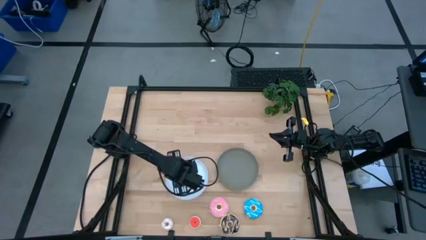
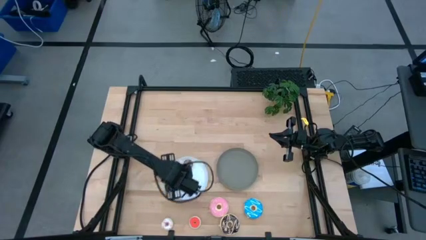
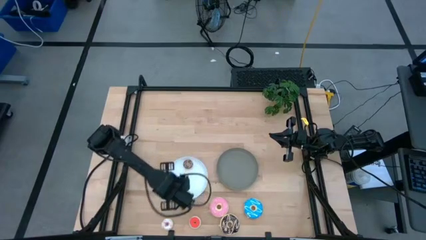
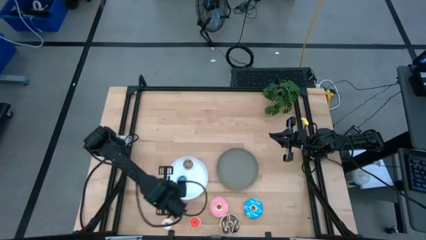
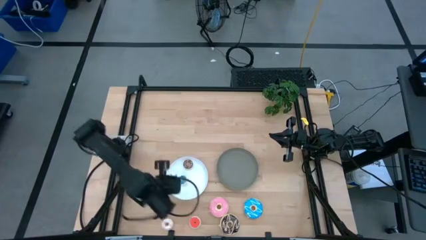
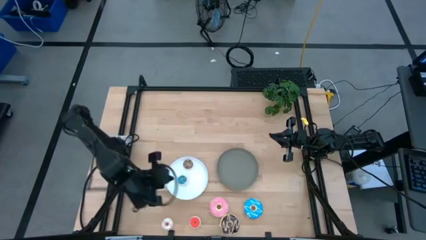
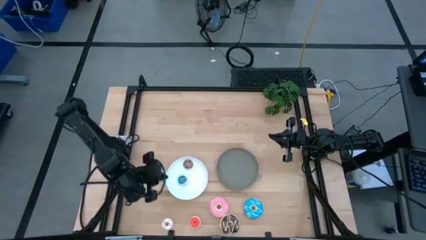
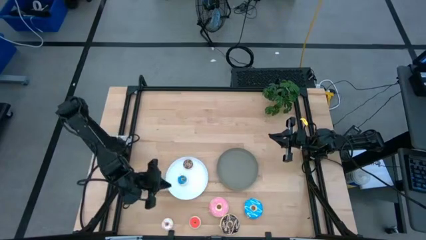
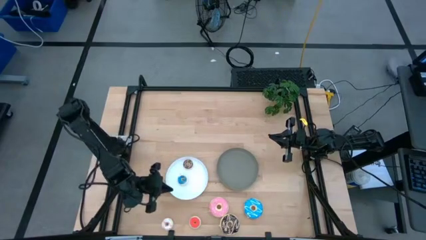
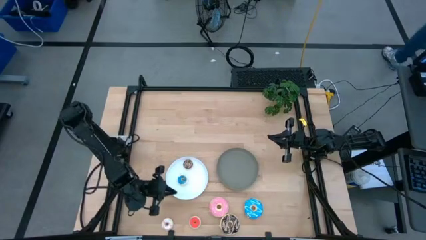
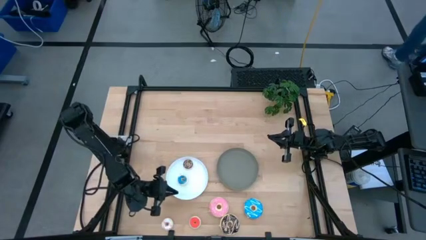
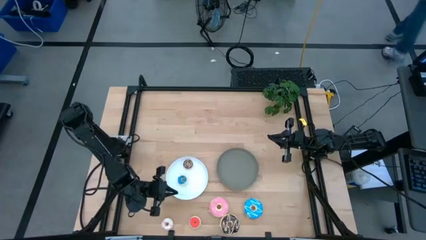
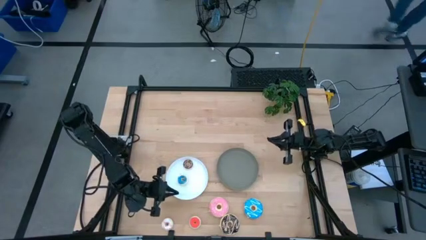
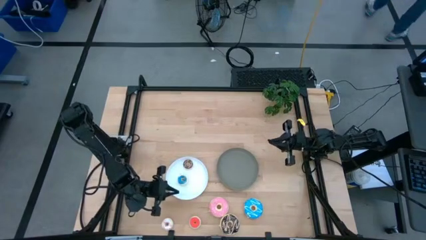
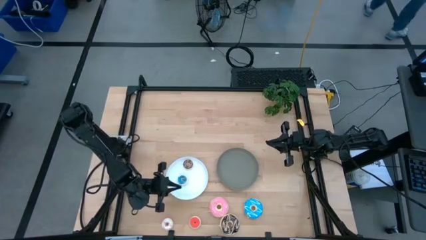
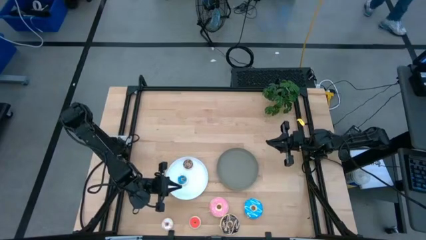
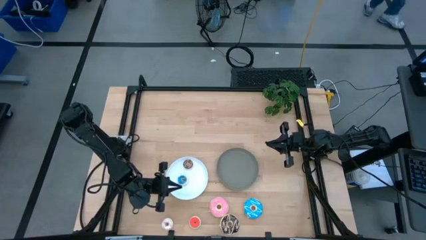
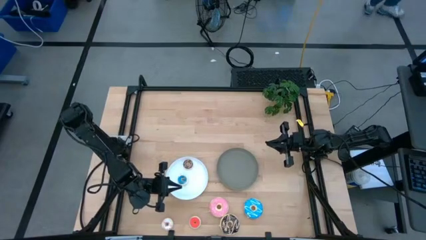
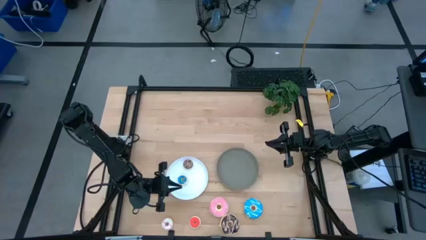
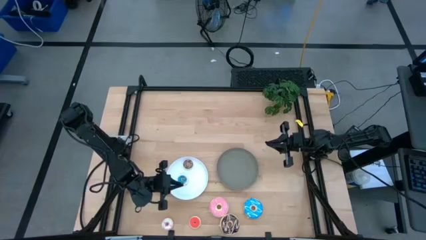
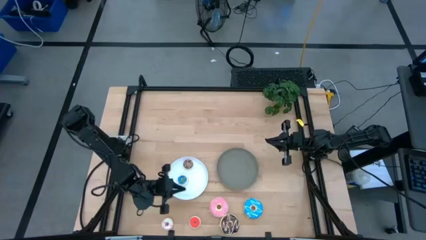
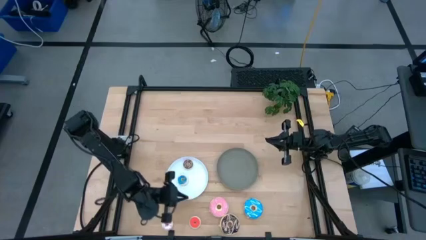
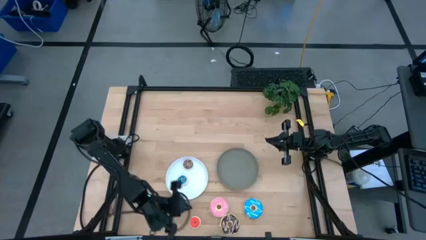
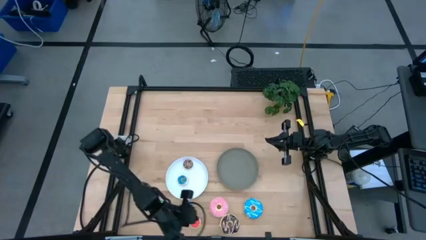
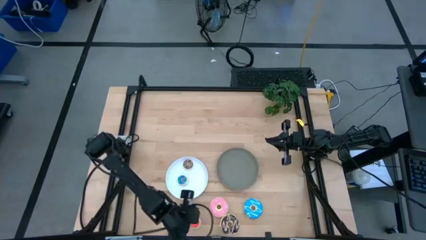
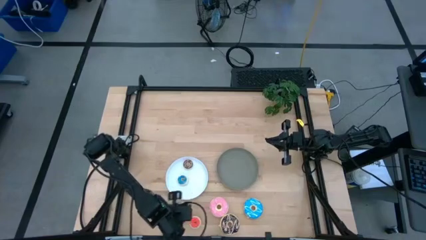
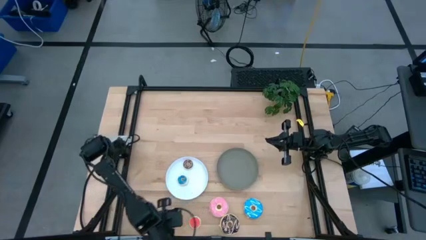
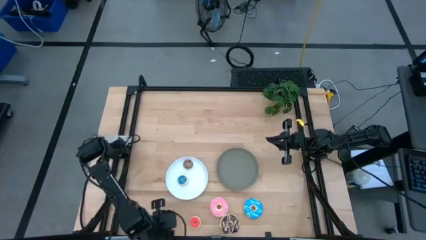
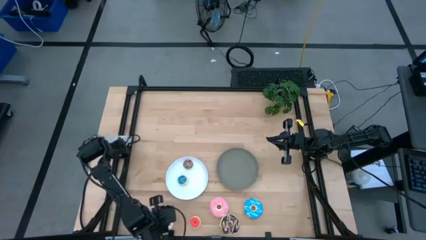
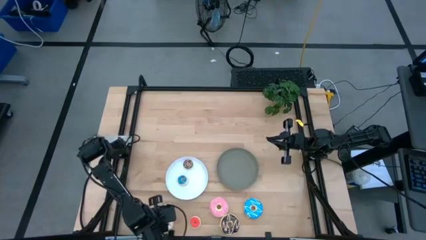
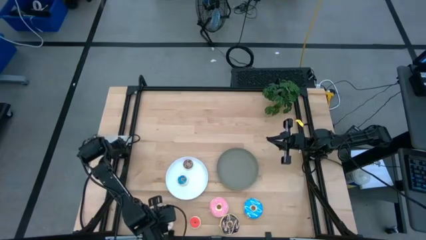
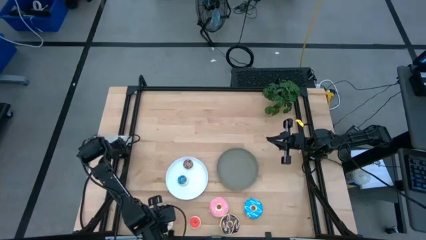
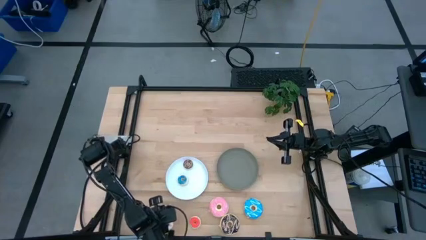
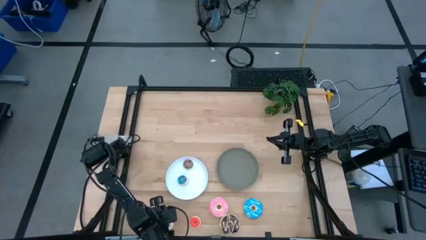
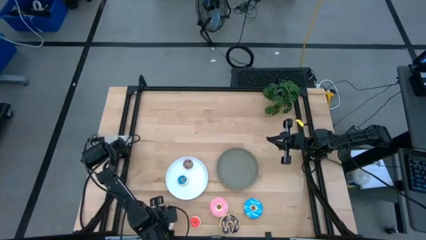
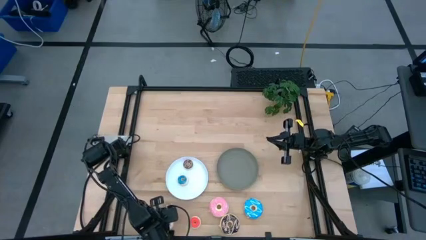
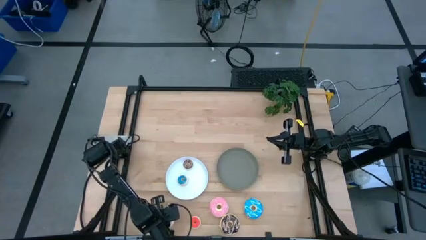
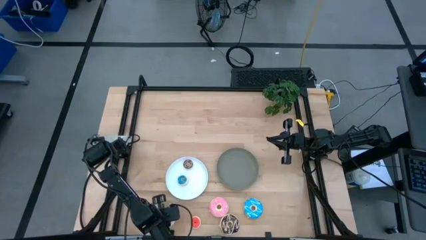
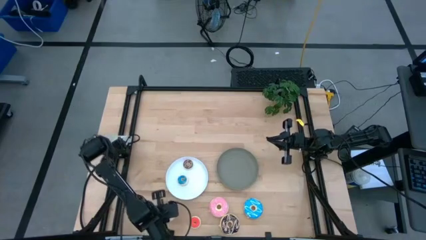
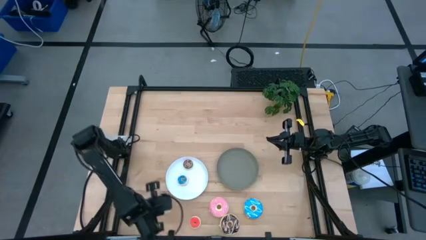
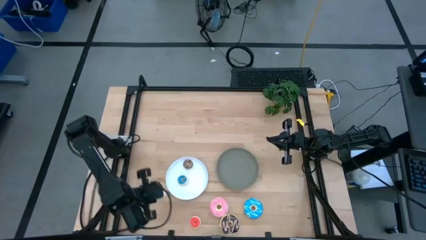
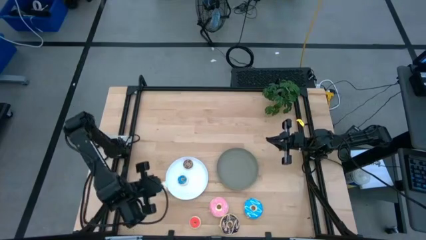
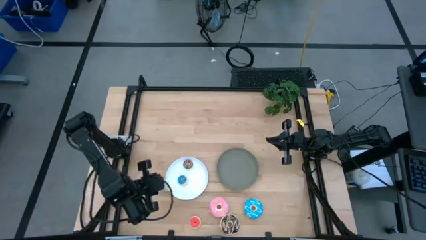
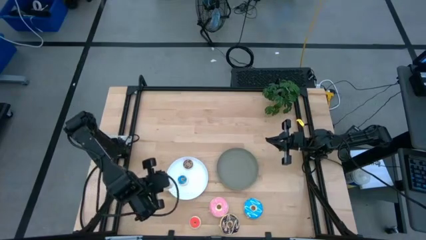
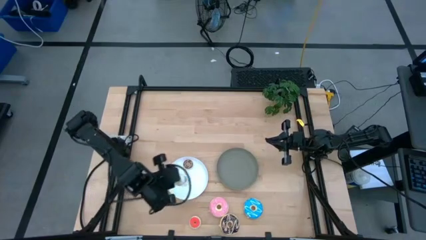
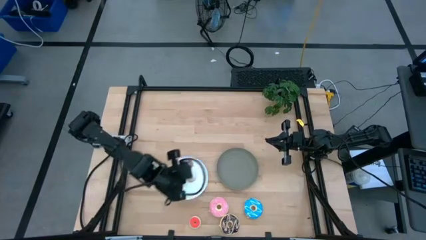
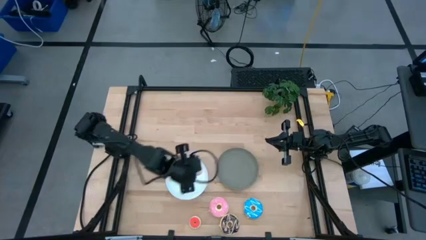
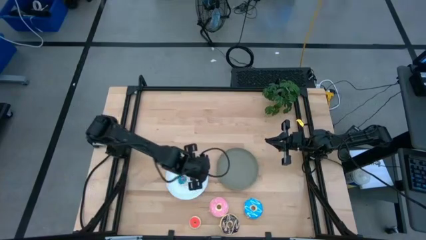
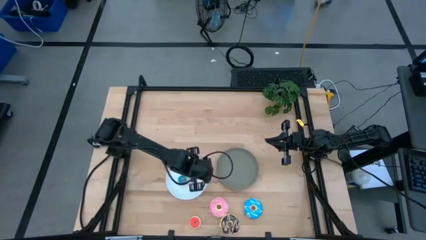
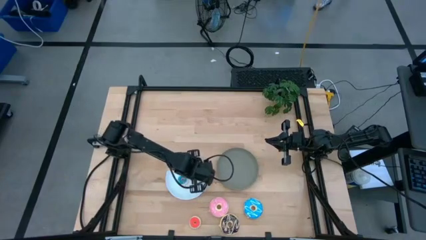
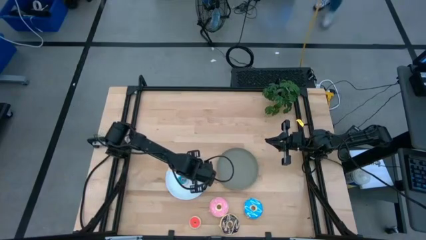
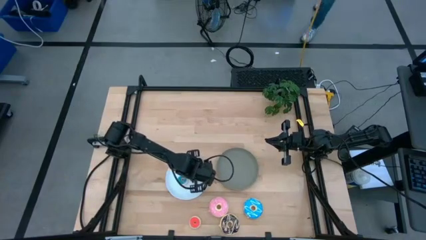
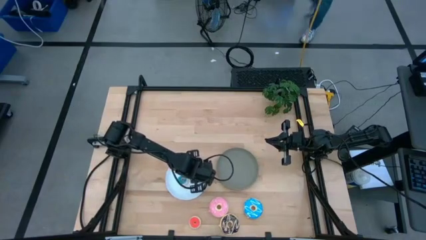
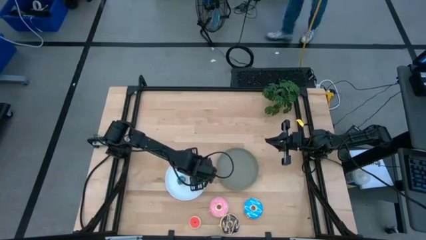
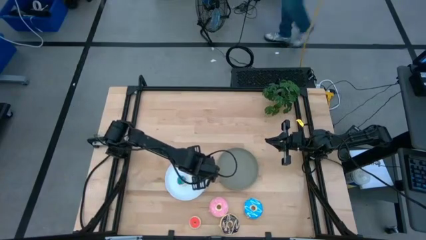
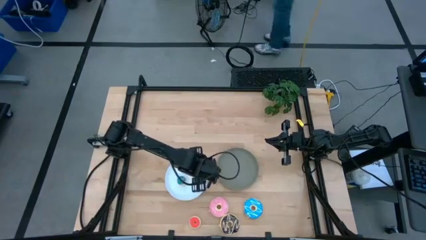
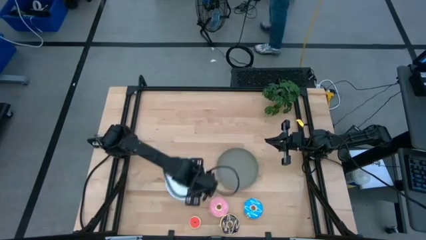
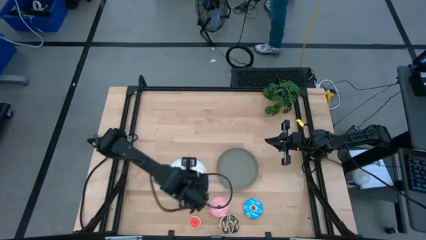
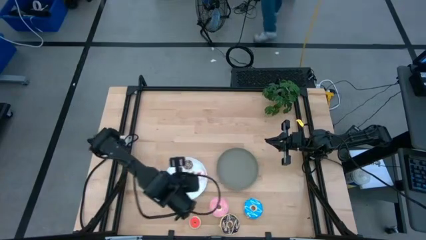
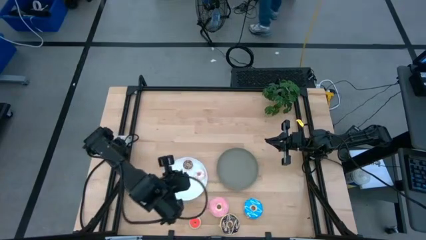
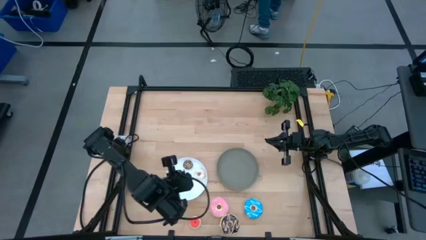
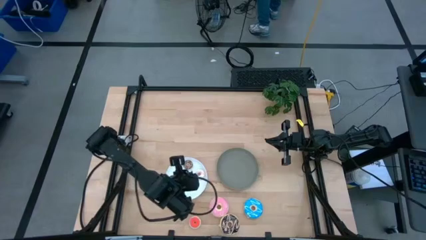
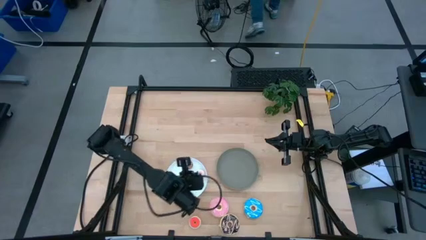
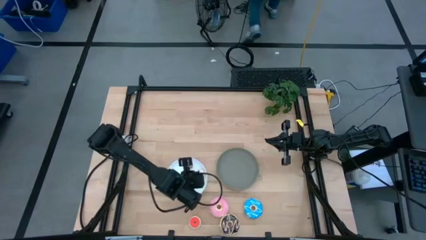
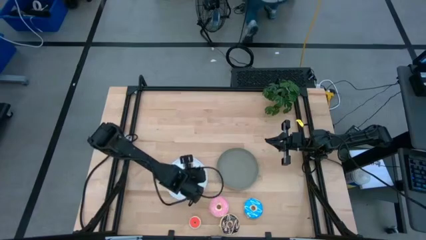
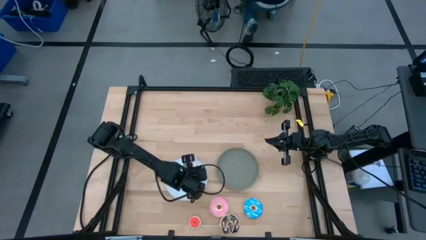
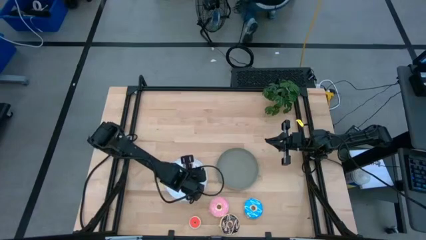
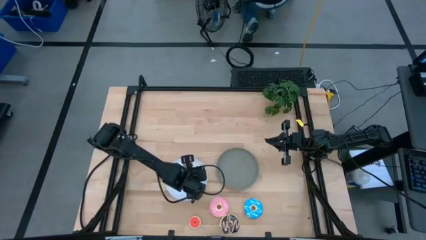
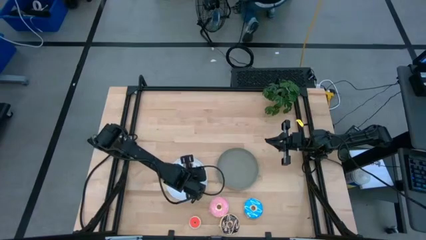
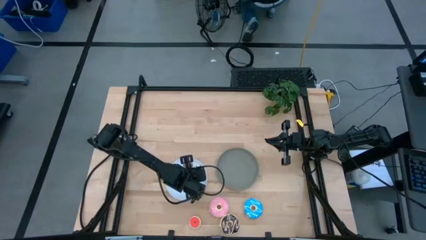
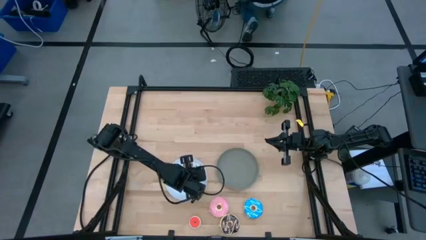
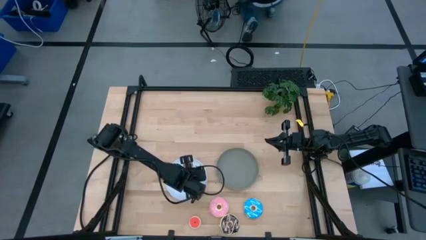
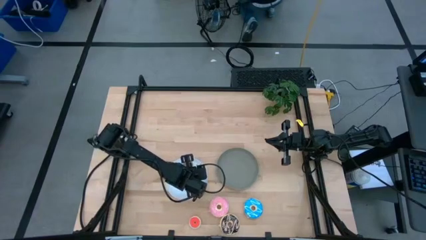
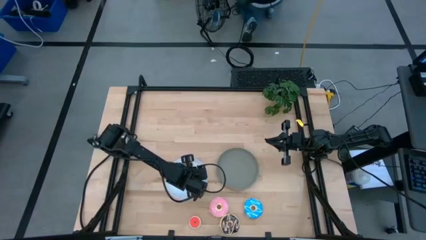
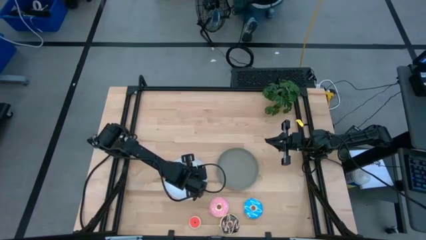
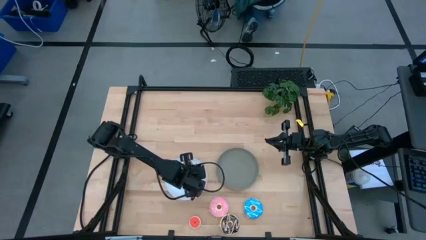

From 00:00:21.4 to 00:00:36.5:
Task: Pick & Place donuts
Put the small white donut on the white plate
